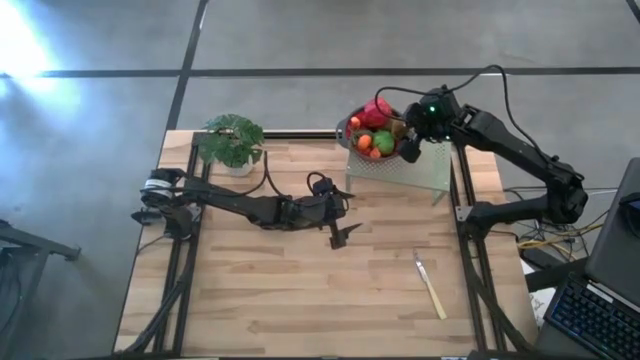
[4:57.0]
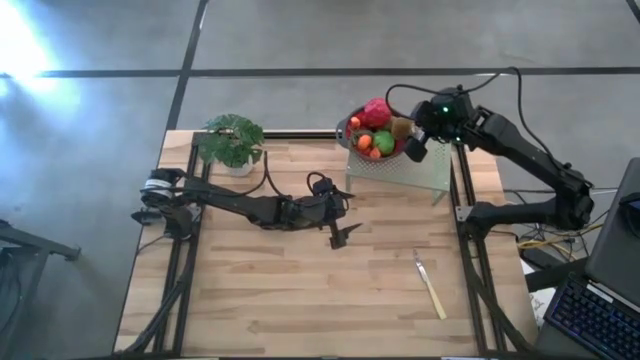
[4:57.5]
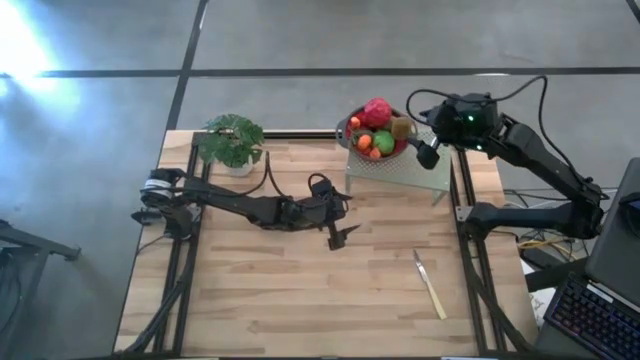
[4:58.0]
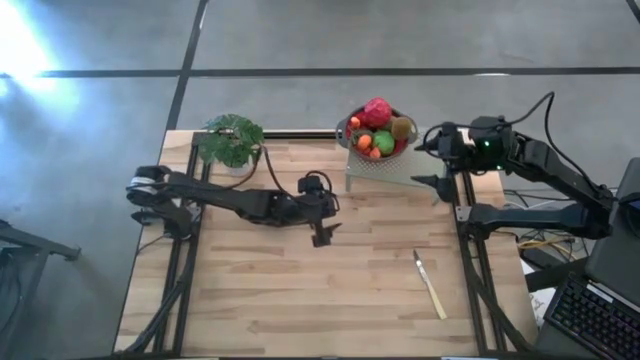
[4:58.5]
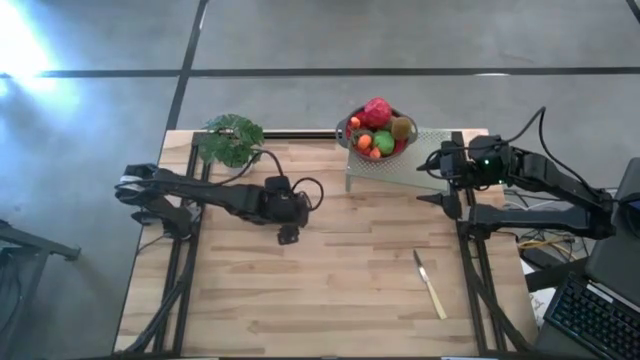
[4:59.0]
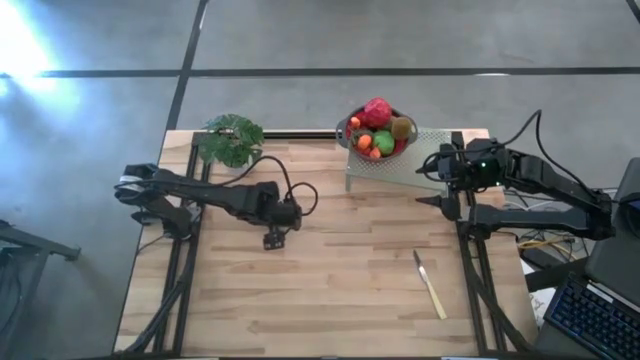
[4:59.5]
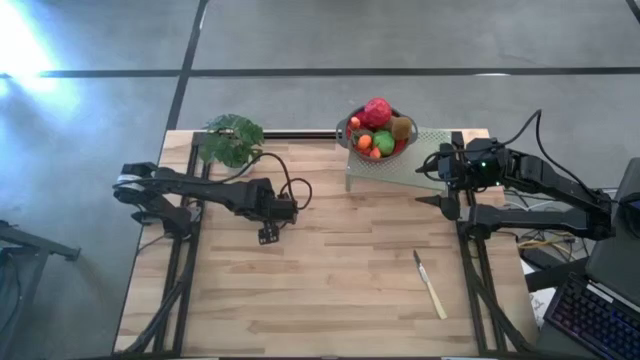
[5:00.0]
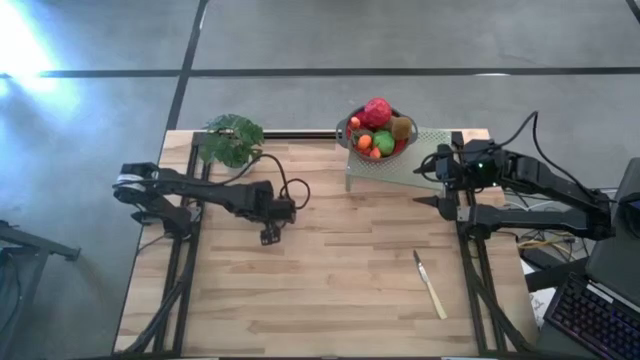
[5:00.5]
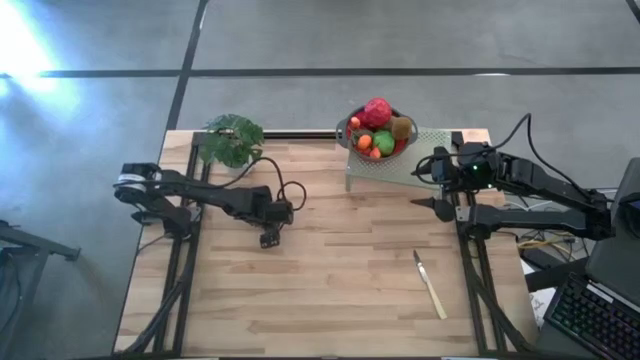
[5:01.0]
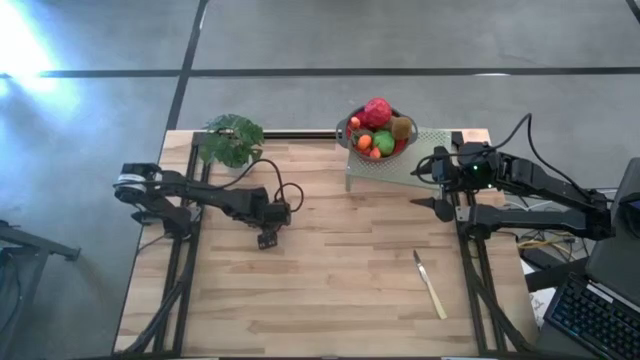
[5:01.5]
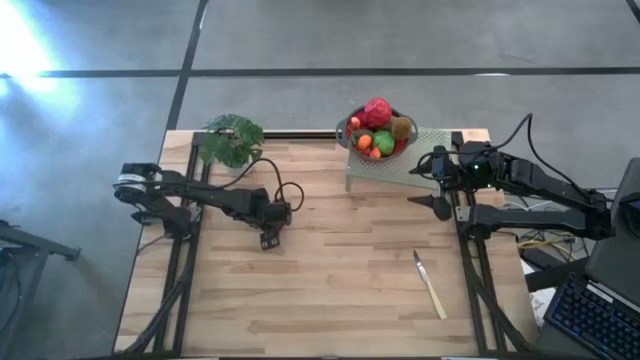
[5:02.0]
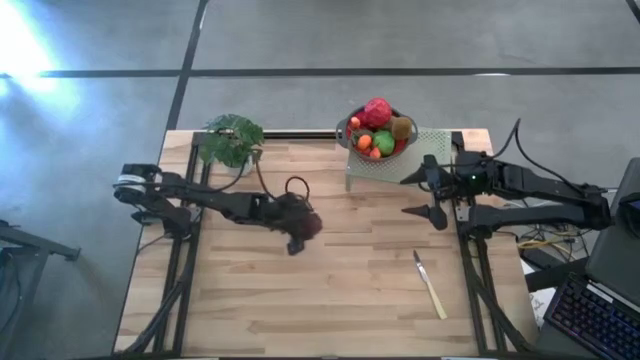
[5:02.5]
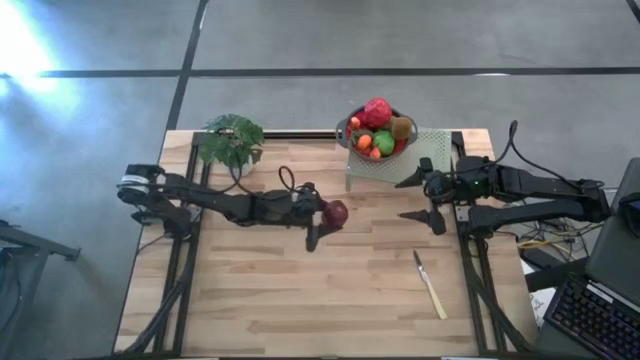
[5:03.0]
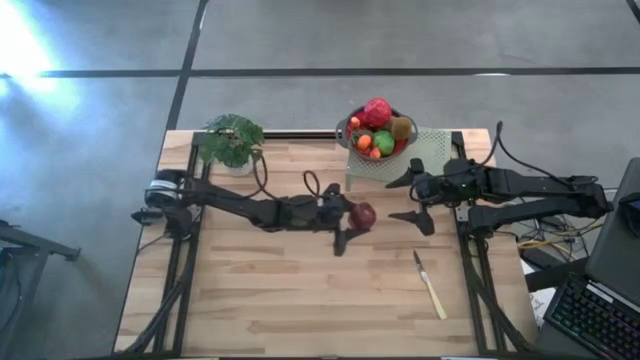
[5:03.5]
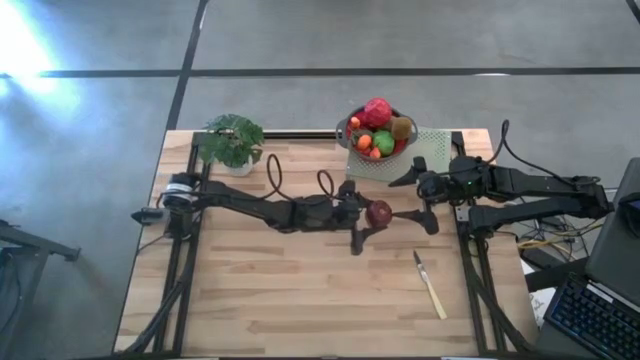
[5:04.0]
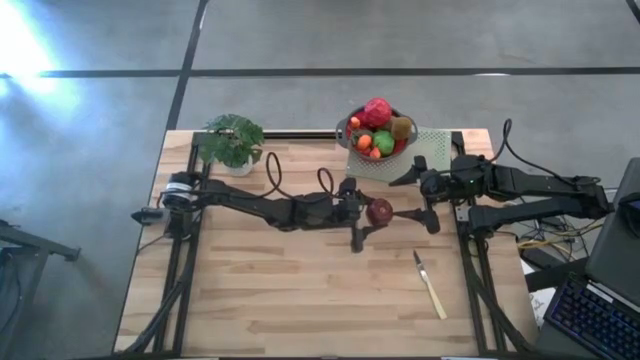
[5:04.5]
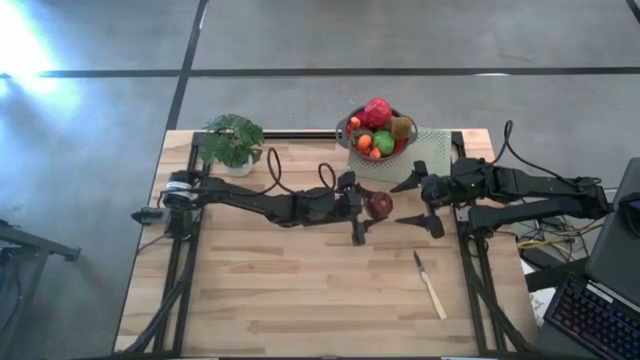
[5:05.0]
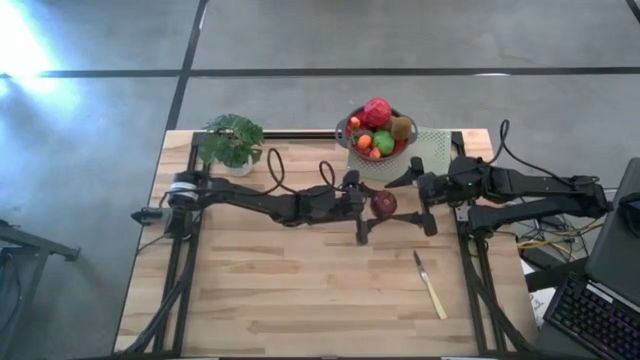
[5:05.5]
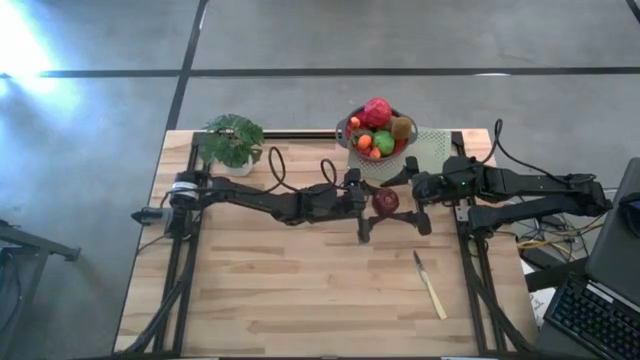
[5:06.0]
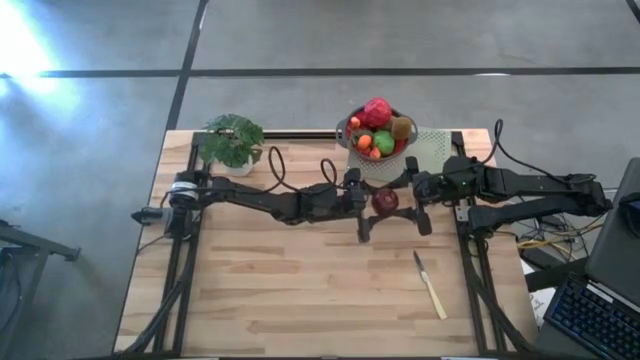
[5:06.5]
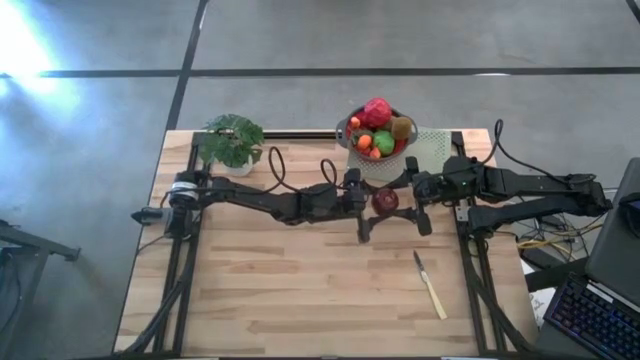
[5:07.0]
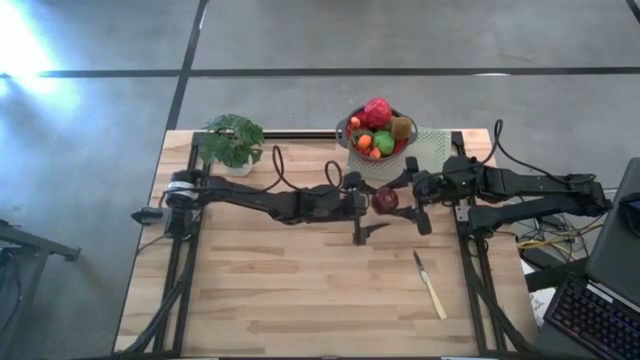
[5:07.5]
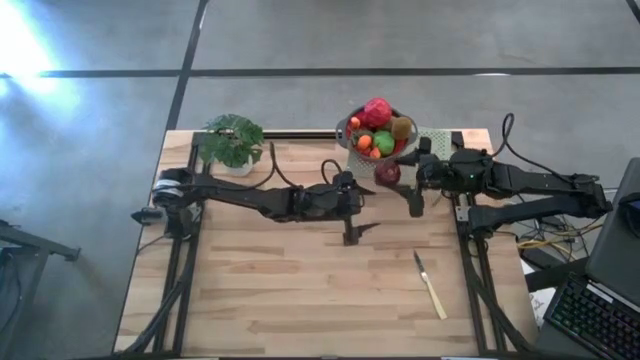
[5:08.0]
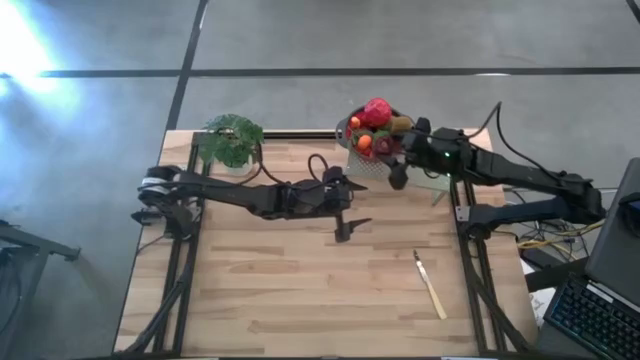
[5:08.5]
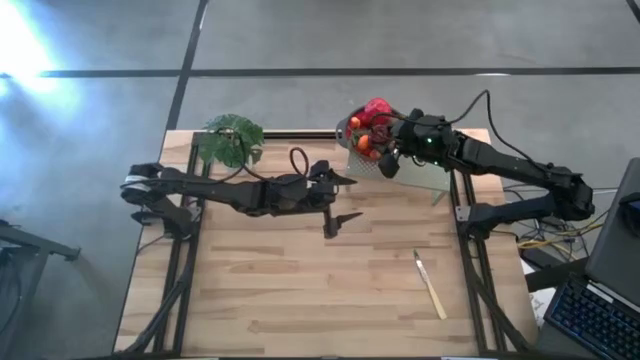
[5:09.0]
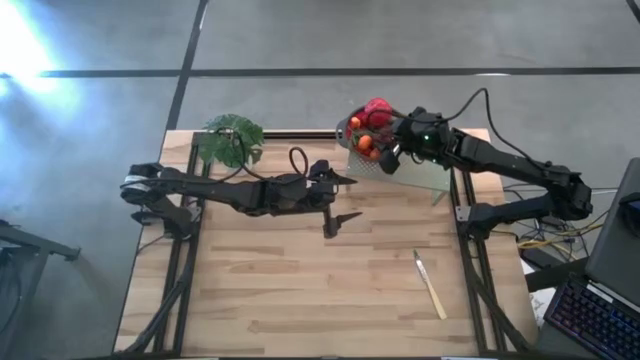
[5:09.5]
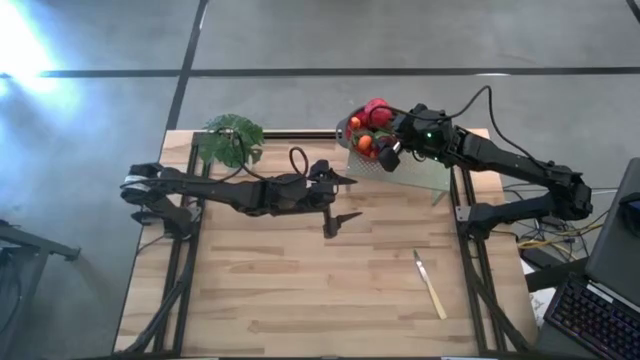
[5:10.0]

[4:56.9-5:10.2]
Task: Pick & Place Fruit
Put the red apple into the strainer bowl on the shelf

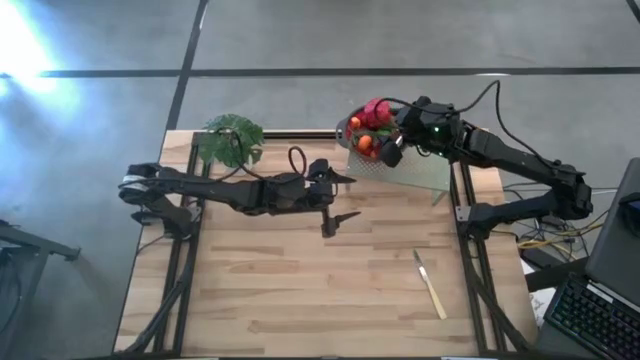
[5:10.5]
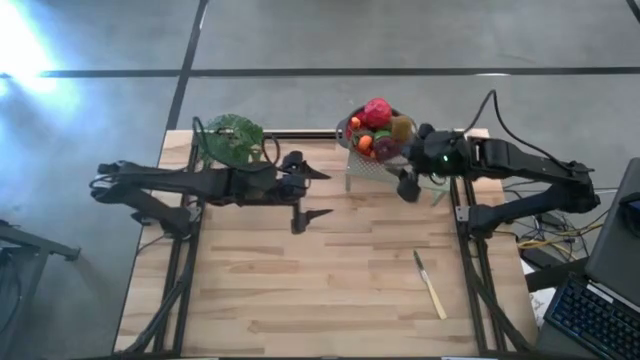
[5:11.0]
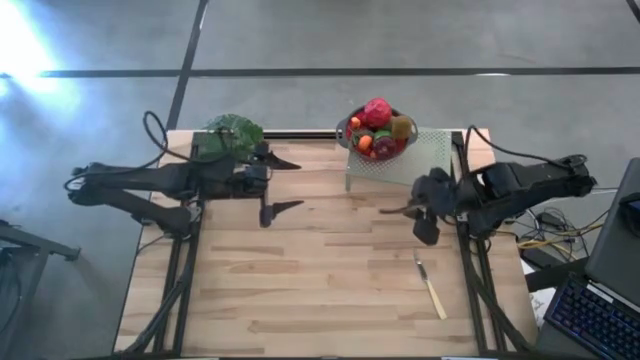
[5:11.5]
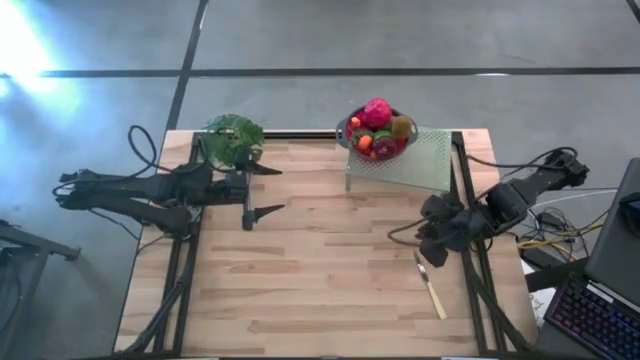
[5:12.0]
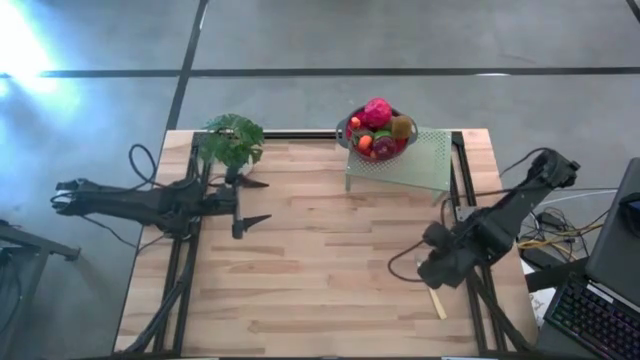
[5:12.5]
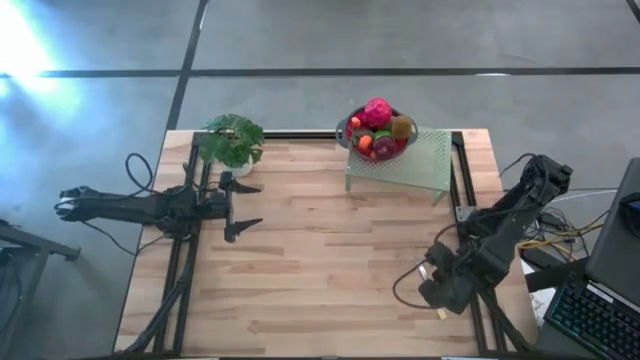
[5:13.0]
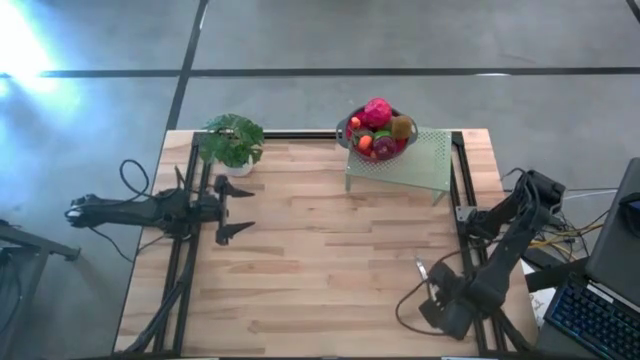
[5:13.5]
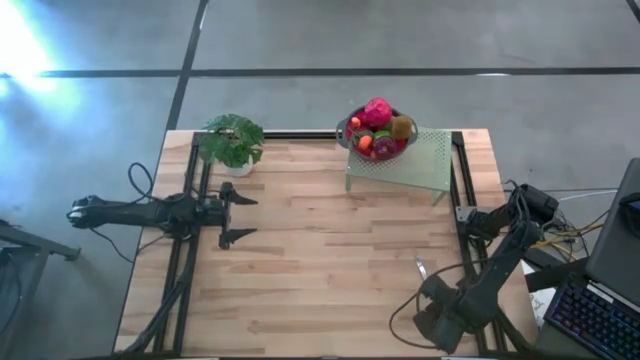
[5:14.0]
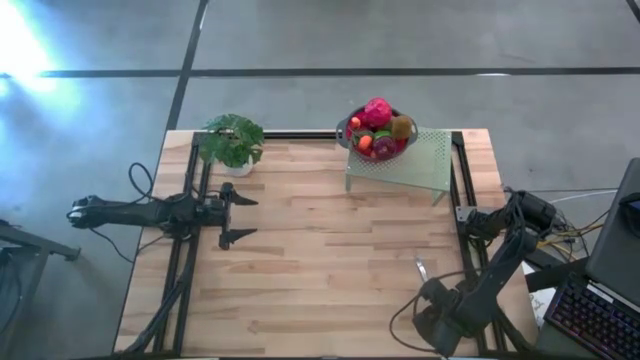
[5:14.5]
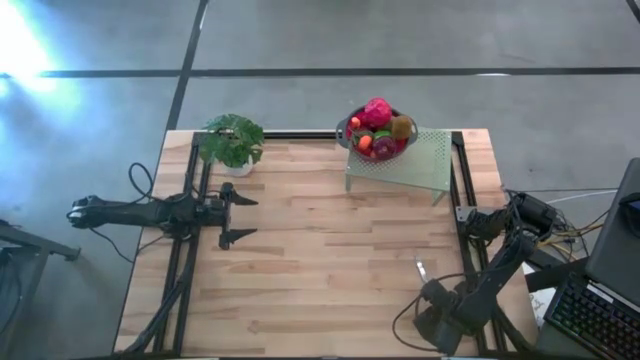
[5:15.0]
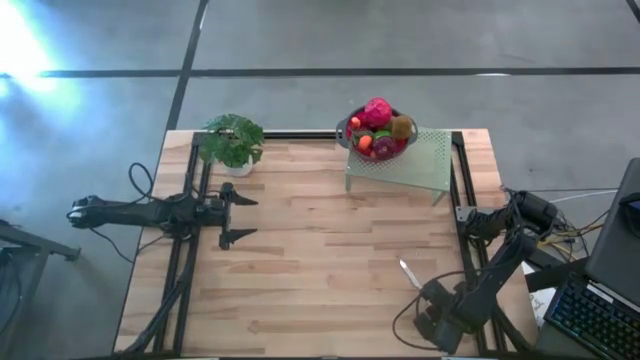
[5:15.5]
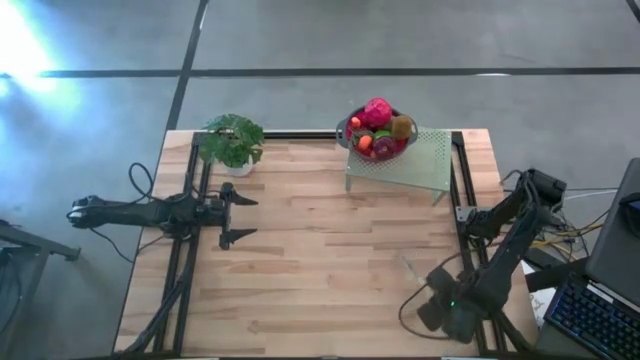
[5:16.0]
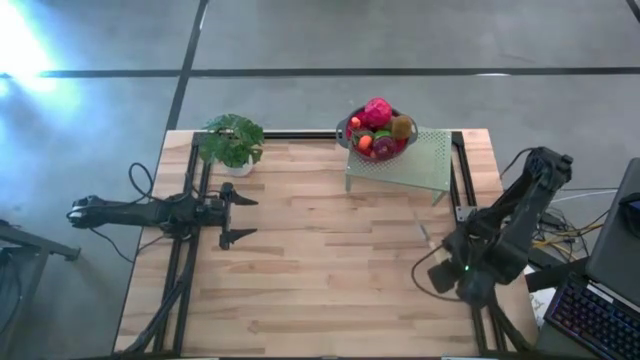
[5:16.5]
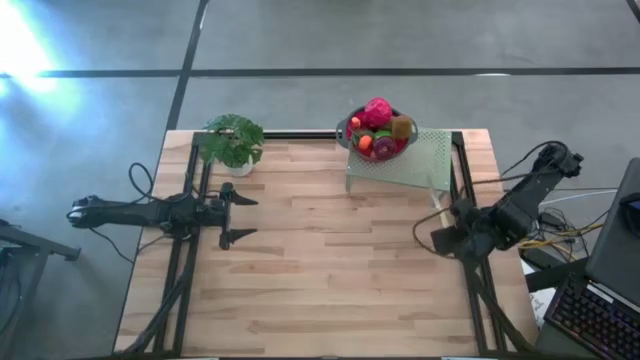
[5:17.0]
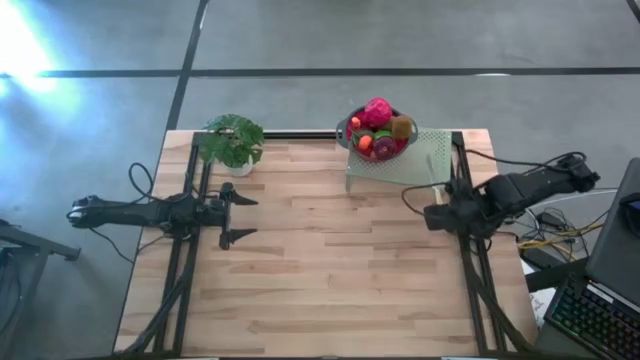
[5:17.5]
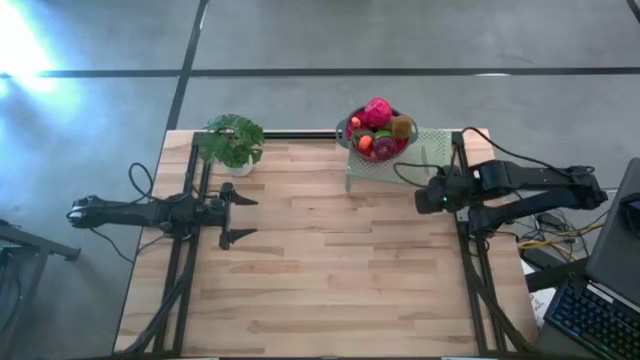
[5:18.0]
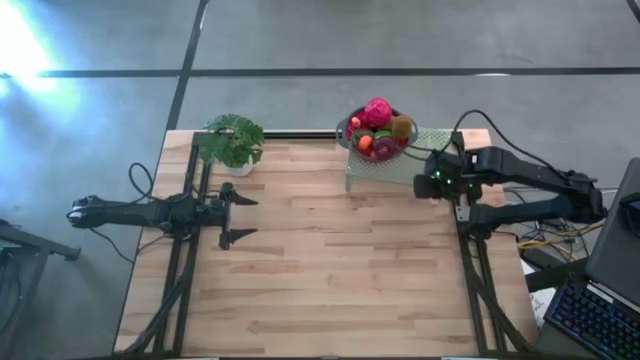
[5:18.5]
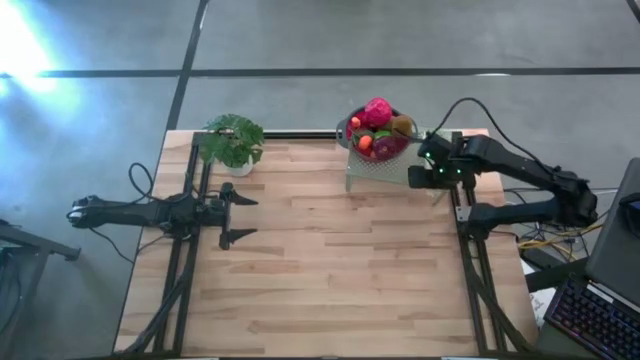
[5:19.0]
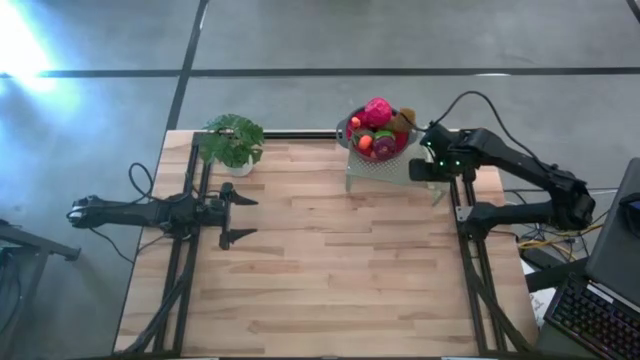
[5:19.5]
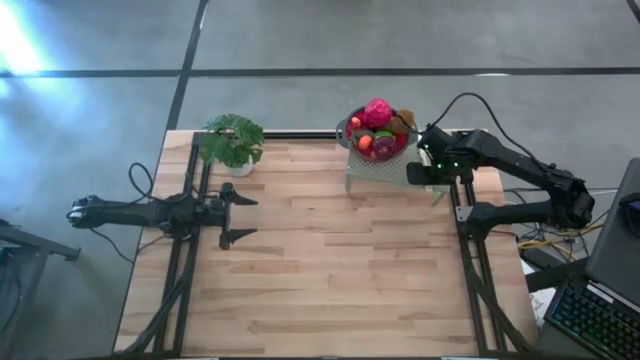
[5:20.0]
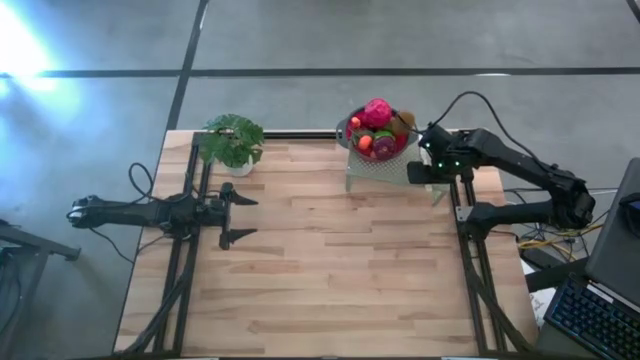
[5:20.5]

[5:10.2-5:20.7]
Put the kitchen knife on the shelf
